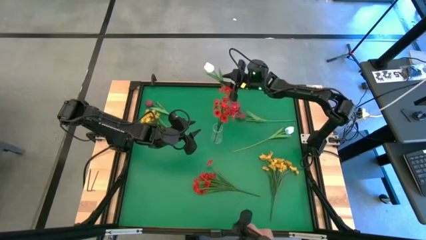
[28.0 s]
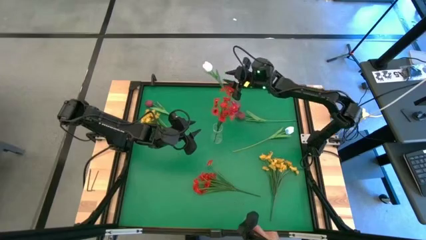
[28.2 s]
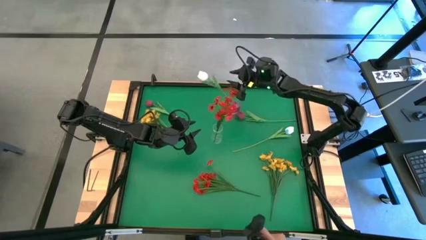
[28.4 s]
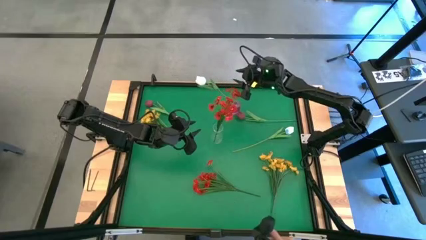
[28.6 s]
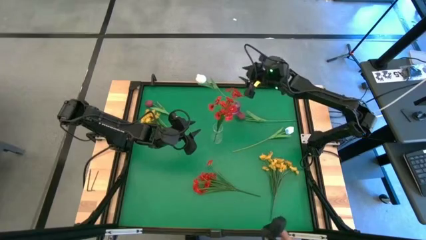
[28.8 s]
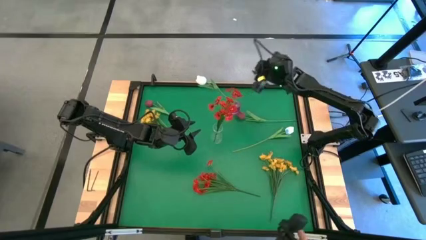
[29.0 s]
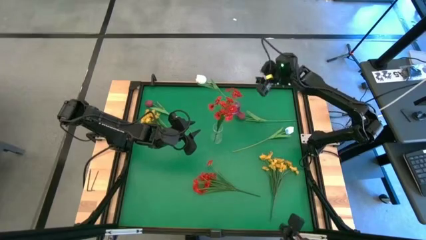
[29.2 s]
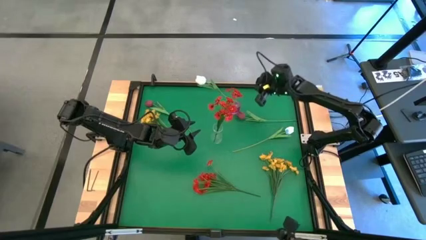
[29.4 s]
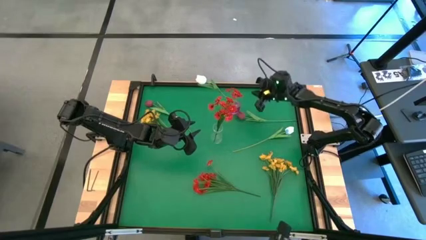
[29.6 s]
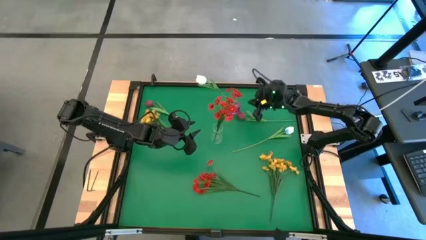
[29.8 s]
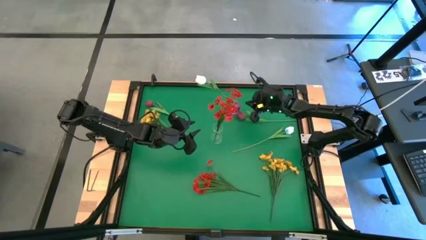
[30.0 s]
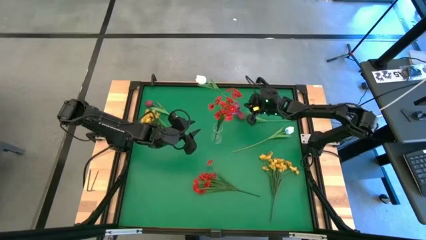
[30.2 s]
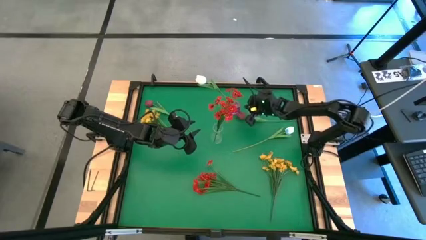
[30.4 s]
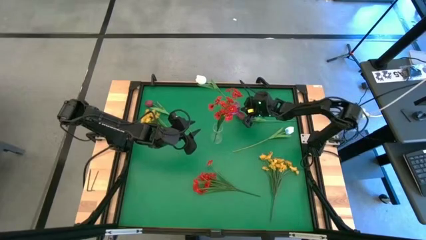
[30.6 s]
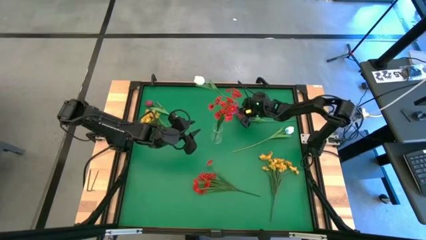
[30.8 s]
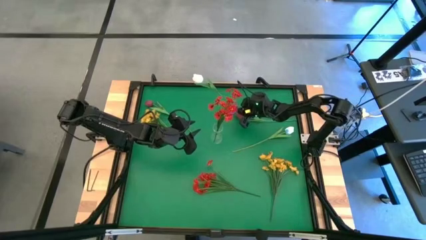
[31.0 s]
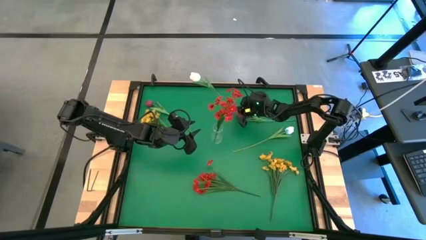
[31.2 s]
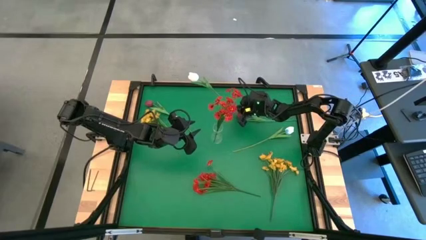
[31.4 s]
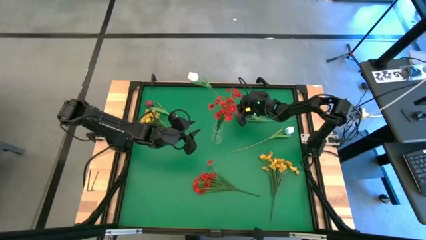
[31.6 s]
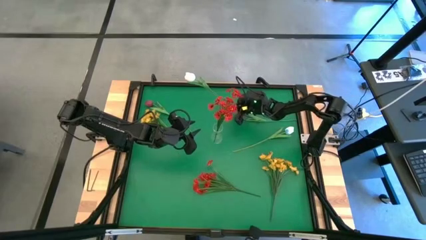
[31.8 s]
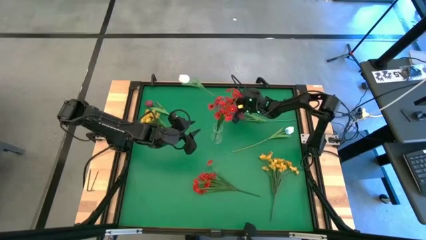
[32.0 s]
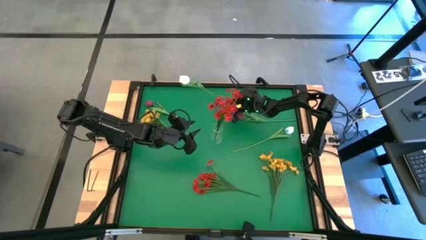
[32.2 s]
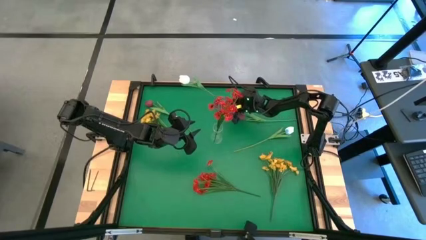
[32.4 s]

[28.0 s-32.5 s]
Task: Sort flowers into vase by color
Adjust the purple vase

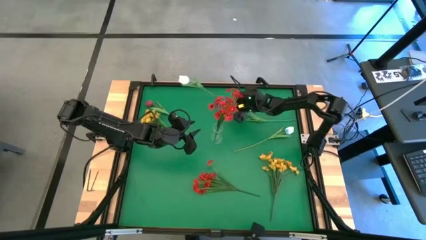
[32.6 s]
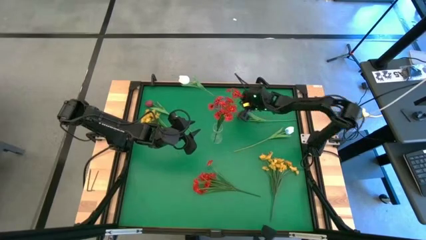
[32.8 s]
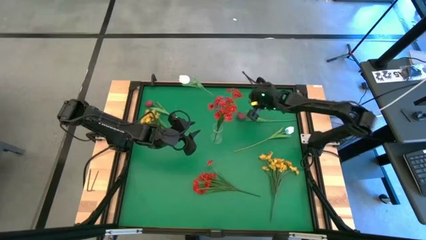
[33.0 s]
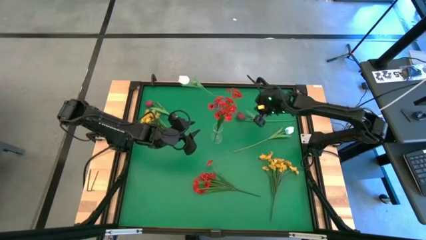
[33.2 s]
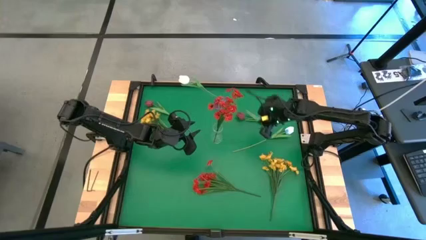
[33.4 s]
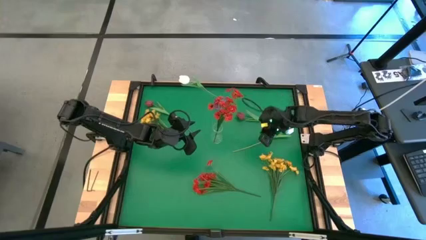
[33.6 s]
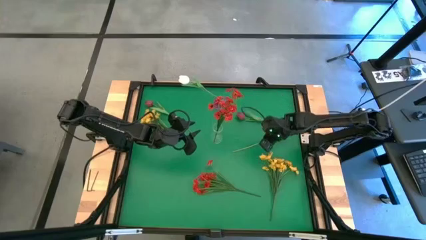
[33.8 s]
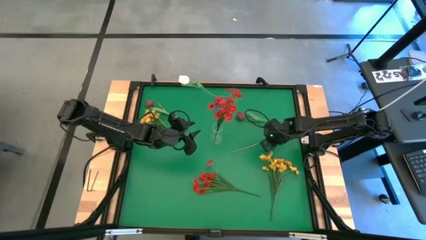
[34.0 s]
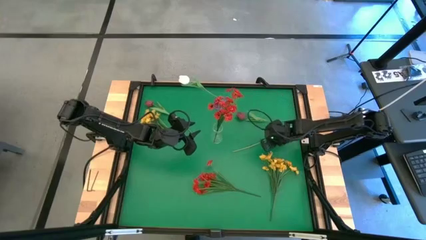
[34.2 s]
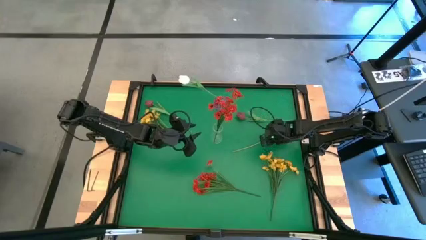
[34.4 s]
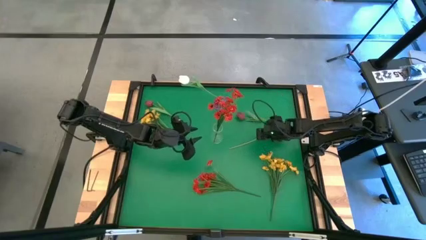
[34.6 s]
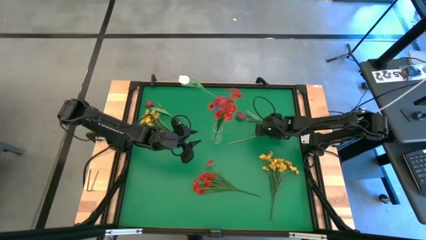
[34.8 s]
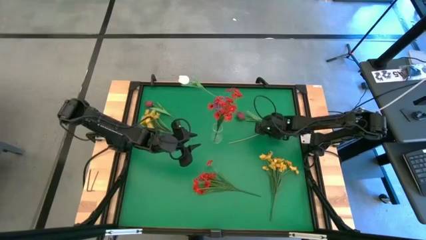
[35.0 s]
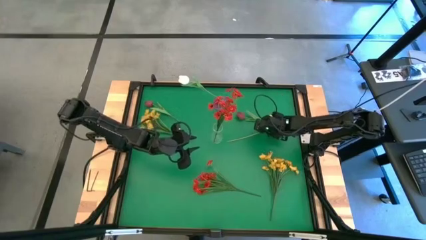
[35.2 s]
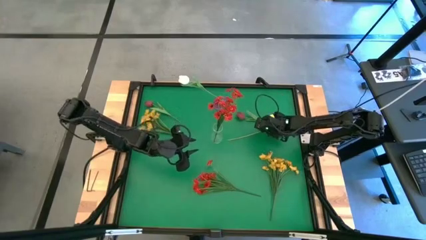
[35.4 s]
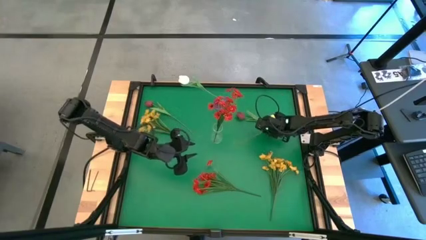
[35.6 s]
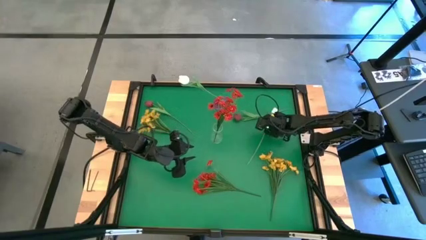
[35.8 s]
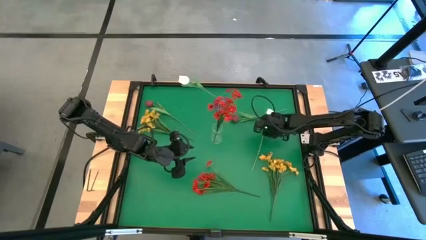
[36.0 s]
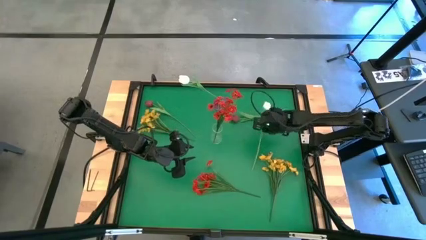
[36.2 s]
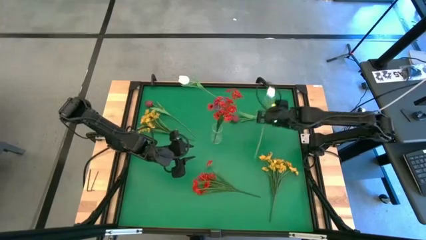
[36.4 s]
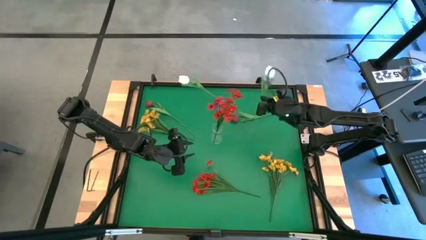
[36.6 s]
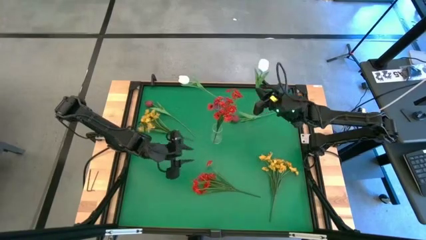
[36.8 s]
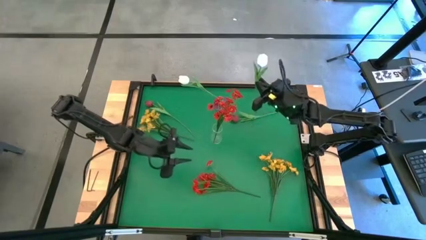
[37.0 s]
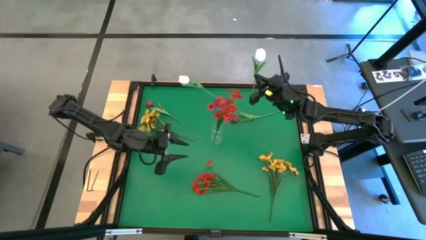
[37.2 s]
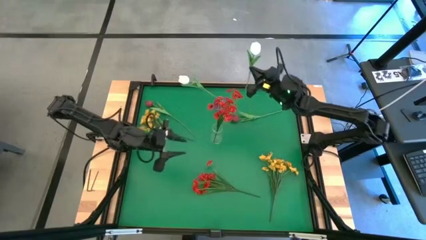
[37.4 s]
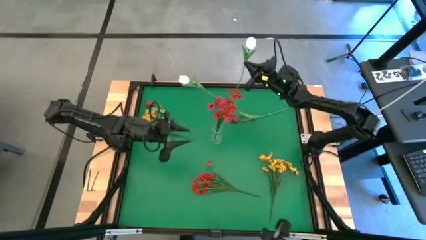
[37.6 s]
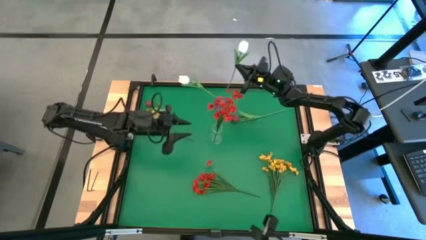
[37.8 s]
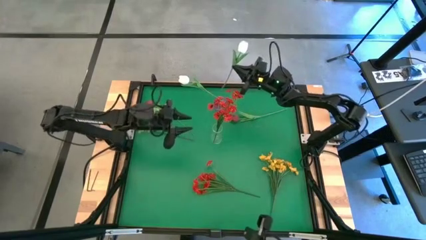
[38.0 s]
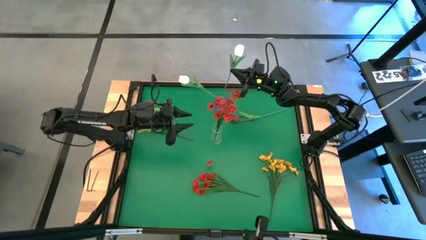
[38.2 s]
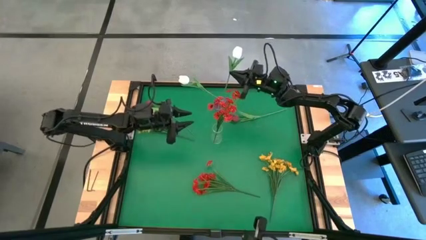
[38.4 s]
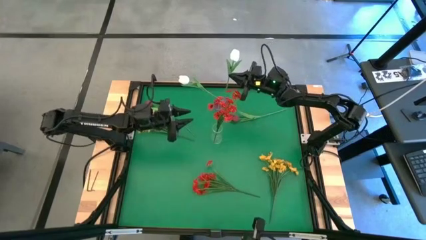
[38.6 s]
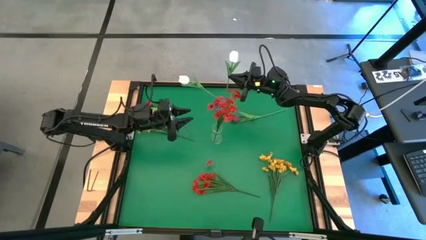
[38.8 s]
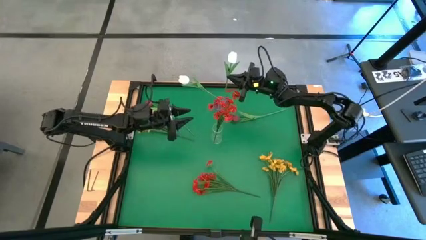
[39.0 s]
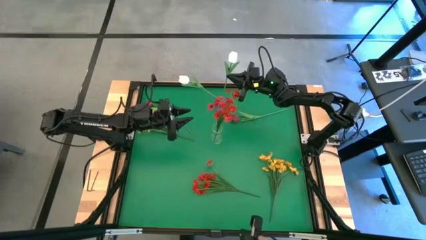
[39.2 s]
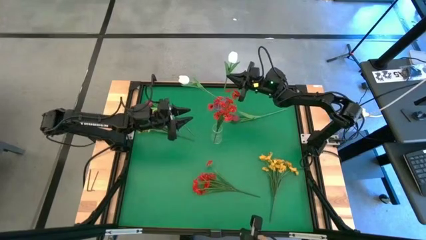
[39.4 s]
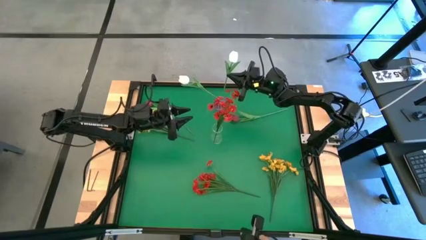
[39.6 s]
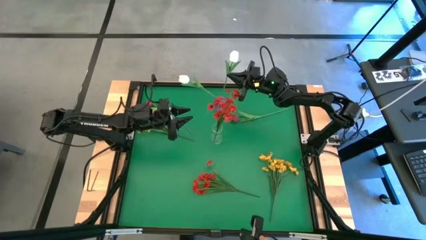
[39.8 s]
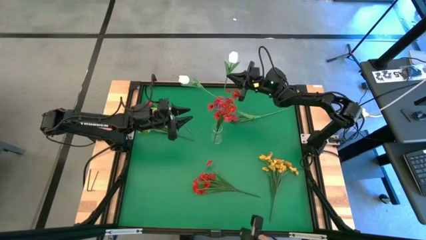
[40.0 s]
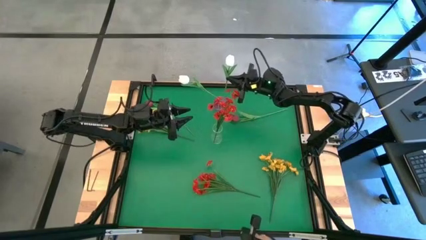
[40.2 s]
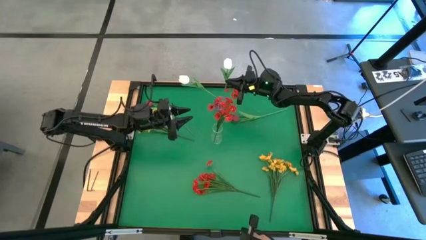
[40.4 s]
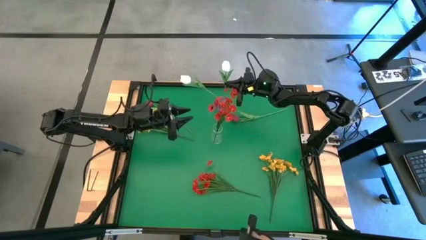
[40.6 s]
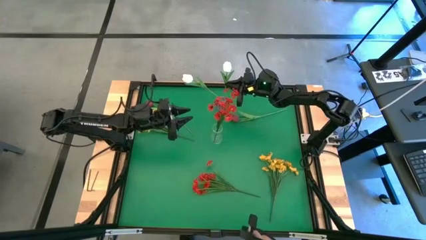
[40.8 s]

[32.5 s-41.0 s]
Put the white tulip into the purple vase
